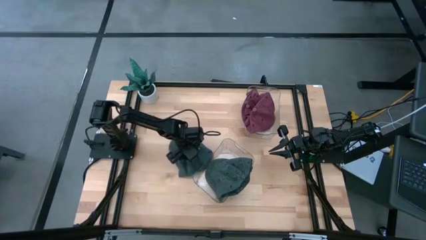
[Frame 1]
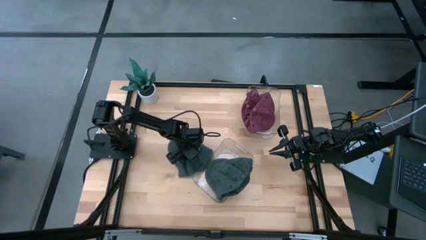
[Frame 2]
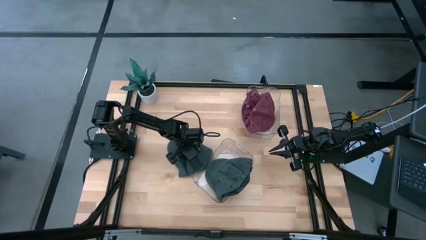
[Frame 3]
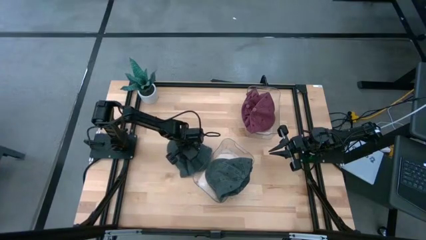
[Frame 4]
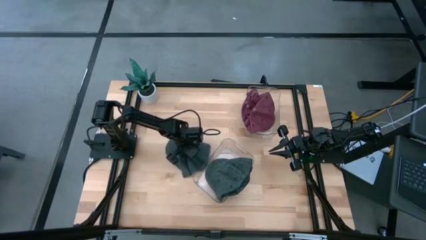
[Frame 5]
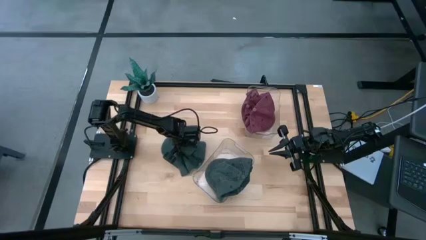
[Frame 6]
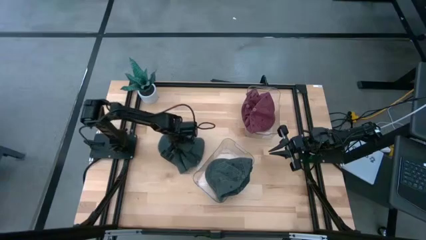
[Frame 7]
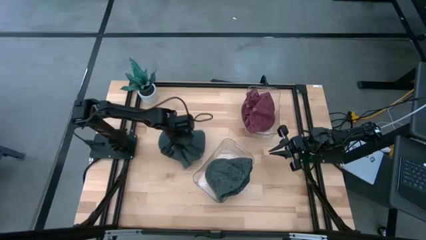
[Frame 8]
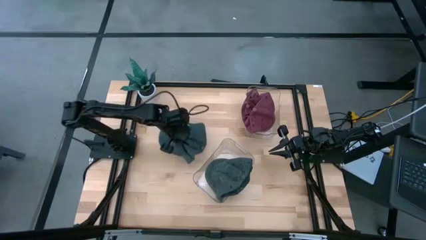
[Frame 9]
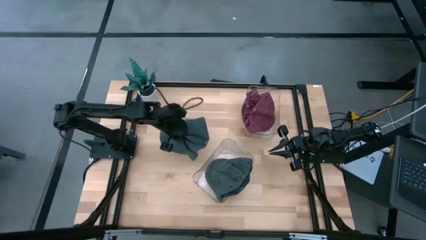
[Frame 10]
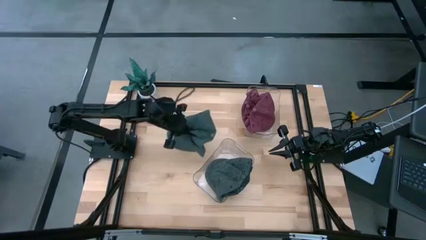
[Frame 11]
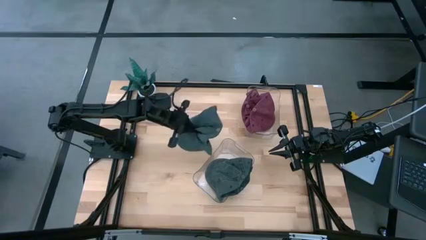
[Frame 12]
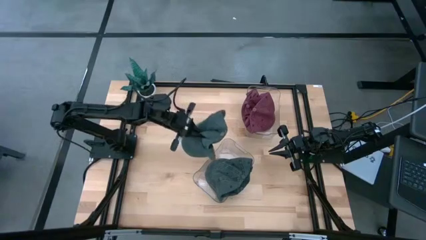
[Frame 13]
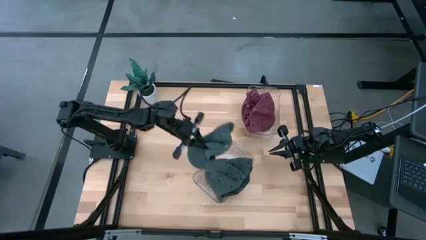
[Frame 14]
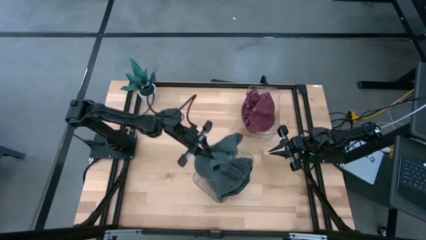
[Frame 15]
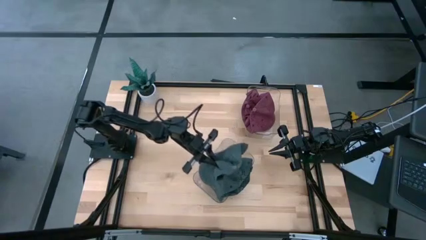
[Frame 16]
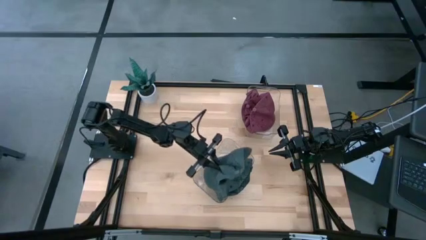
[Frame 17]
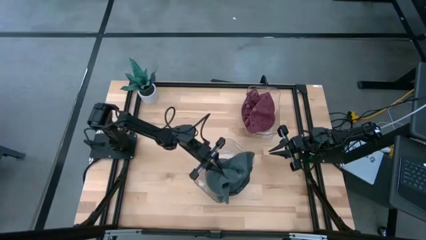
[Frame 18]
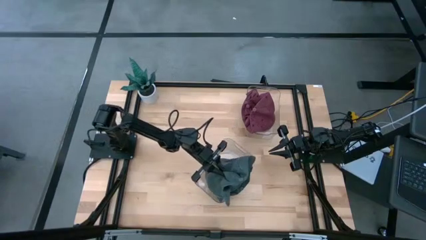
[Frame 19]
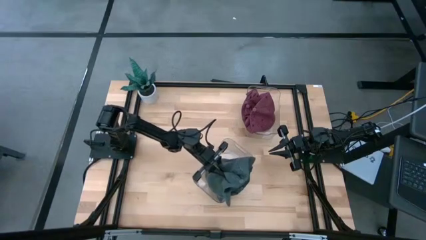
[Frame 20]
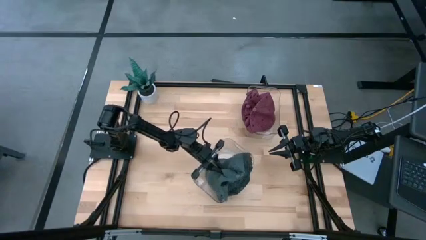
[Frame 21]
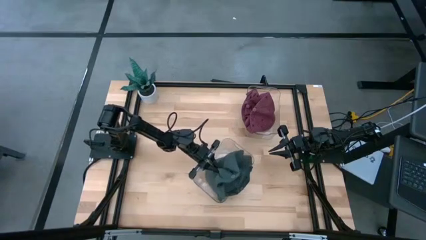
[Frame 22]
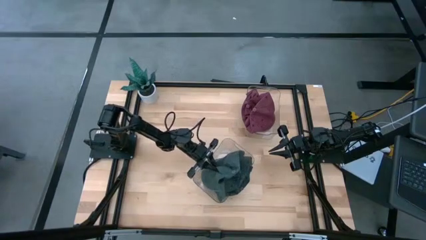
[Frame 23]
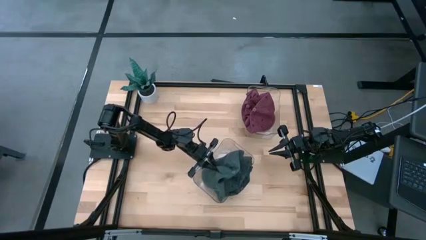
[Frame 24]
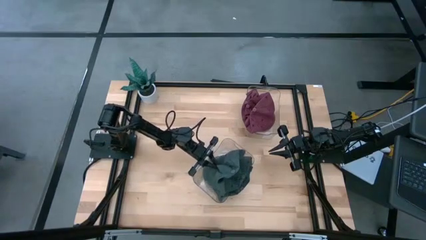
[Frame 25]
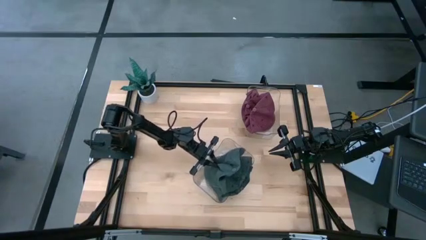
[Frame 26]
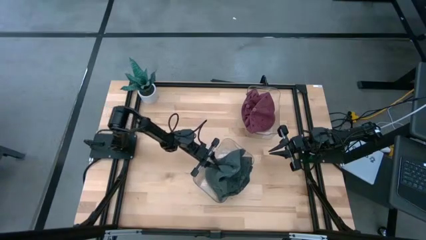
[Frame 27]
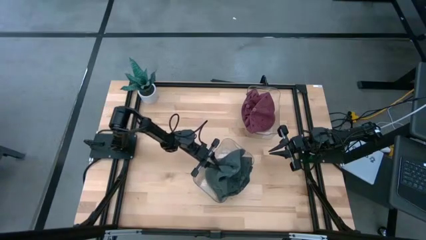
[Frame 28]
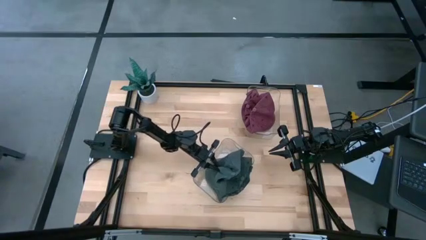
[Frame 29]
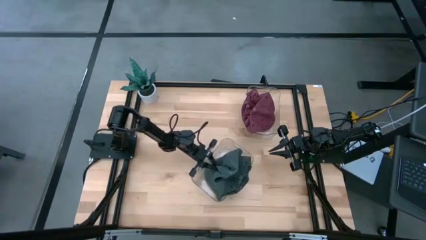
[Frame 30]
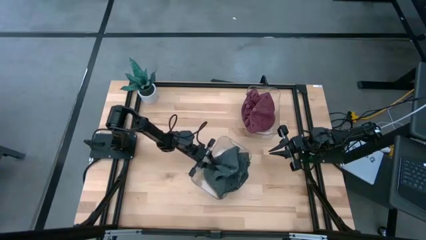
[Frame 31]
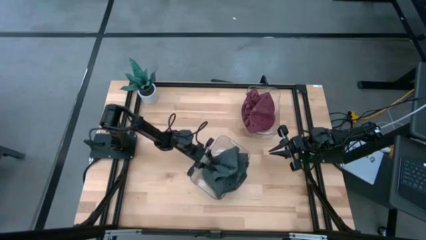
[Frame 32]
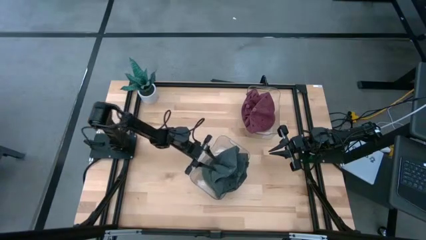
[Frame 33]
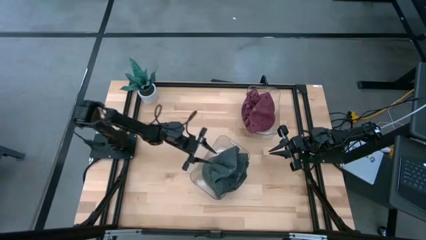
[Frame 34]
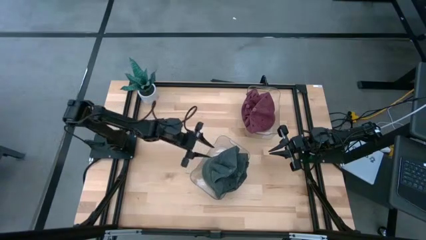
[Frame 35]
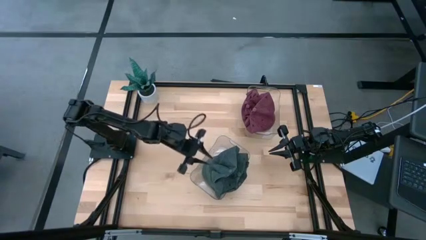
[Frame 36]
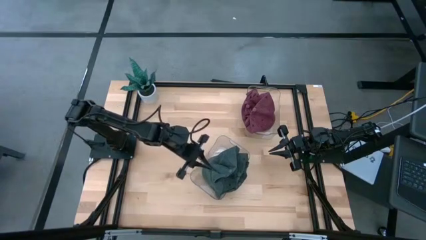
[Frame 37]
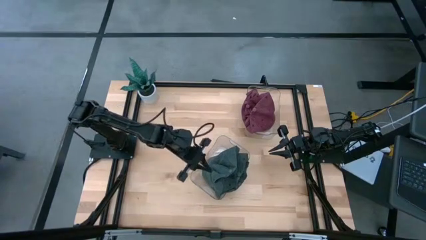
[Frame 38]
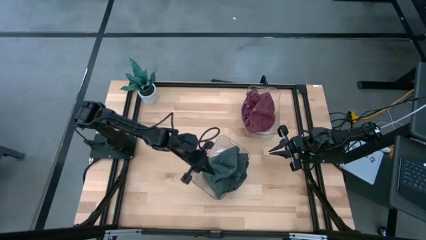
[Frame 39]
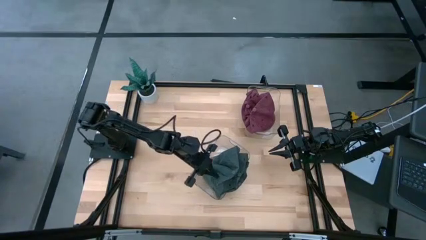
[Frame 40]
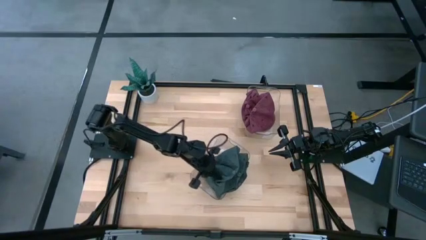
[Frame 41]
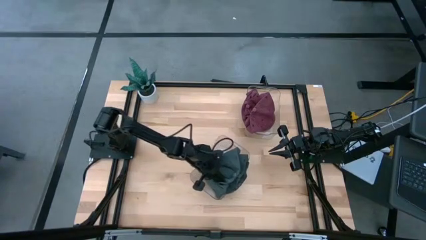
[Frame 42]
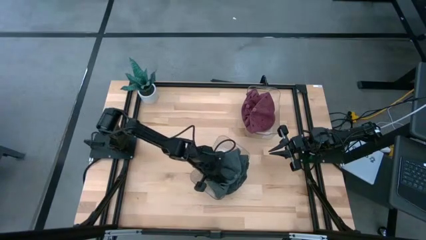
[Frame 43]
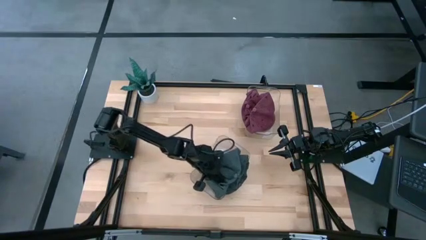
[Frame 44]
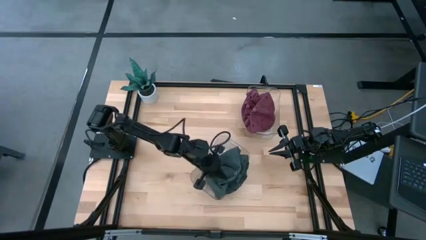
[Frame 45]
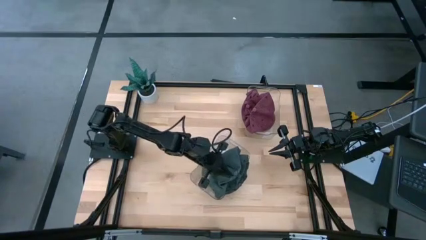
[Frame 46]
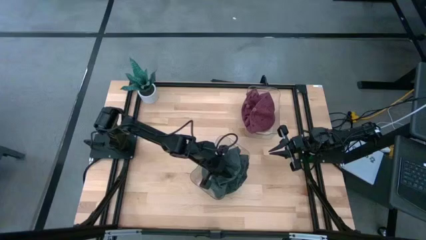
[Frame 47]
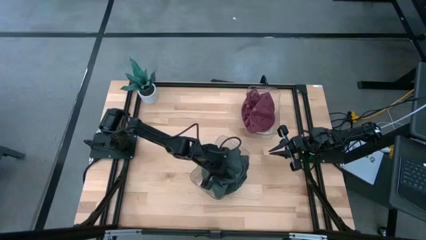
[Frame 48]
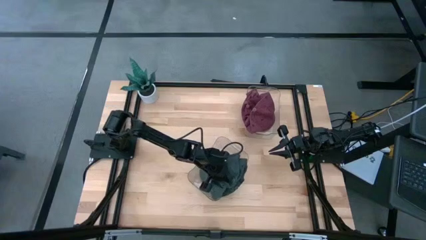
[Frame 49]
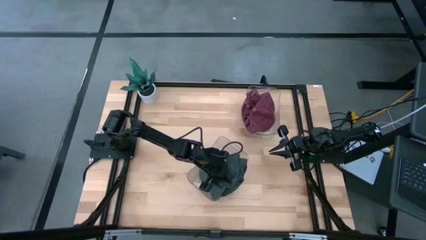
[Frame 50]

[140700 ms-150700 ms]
Task: Pick & Place hat
Put the black cap into the bottom transparent bin

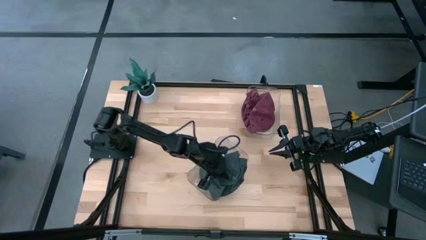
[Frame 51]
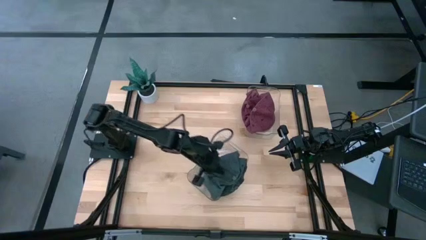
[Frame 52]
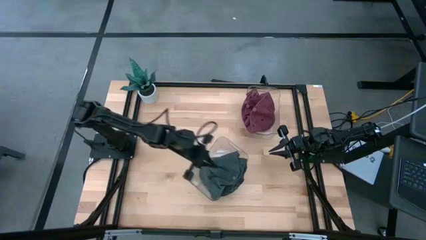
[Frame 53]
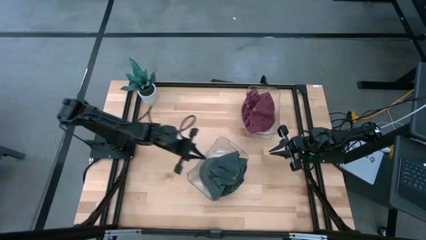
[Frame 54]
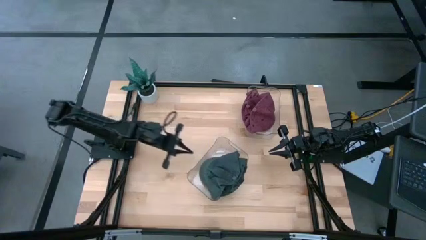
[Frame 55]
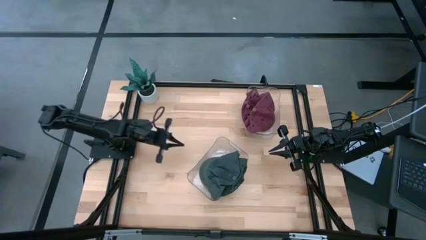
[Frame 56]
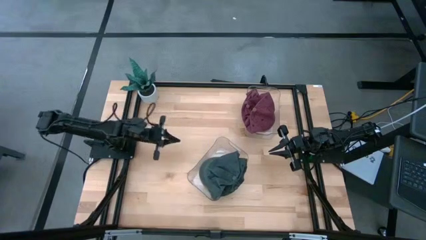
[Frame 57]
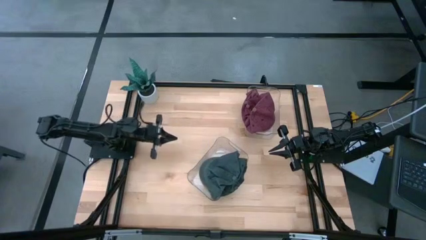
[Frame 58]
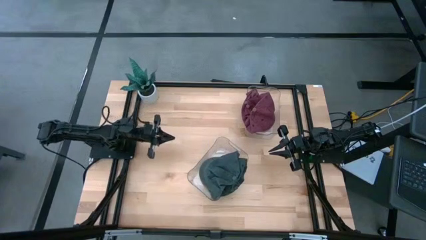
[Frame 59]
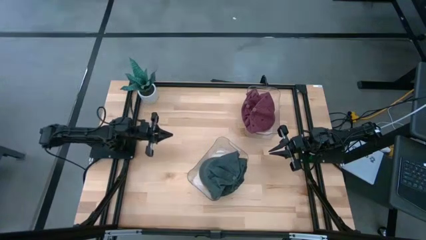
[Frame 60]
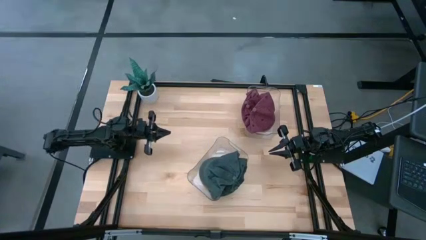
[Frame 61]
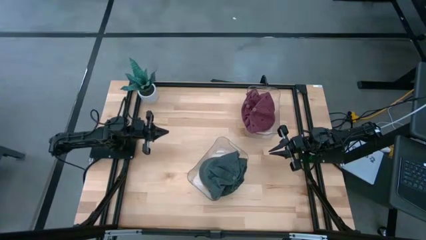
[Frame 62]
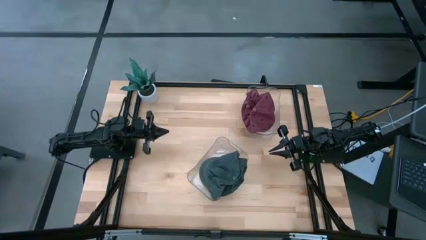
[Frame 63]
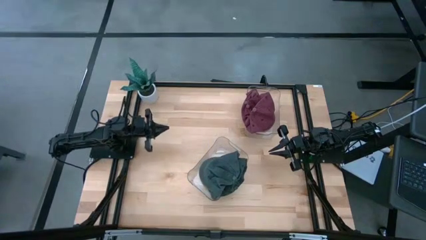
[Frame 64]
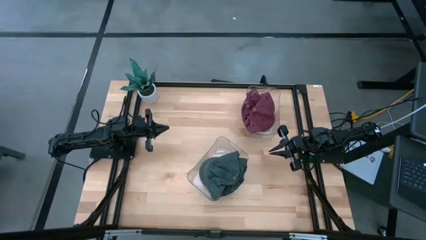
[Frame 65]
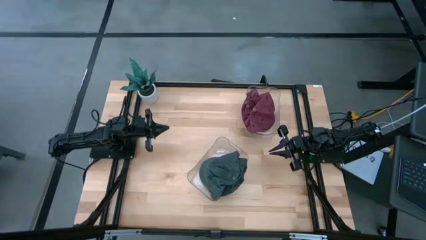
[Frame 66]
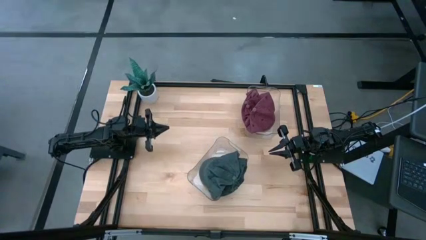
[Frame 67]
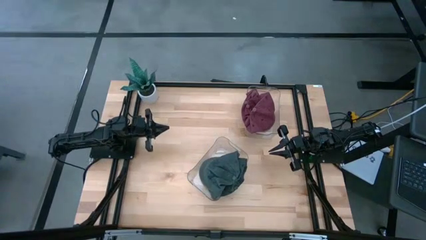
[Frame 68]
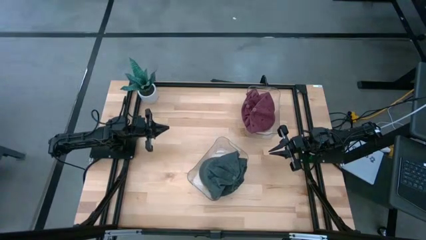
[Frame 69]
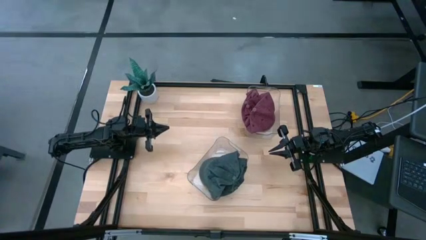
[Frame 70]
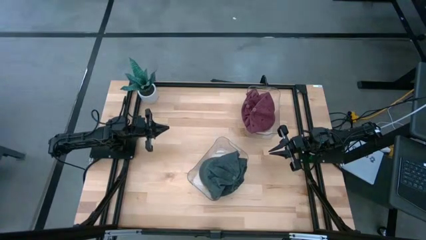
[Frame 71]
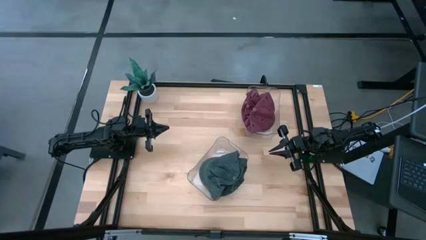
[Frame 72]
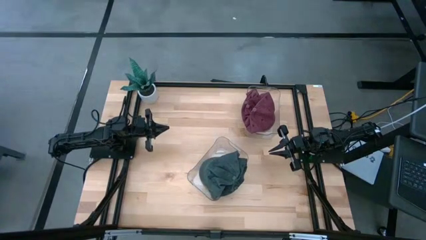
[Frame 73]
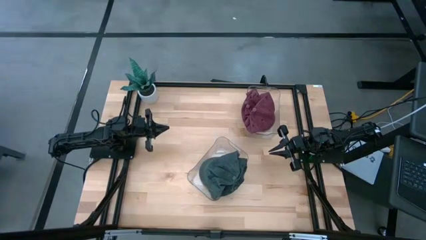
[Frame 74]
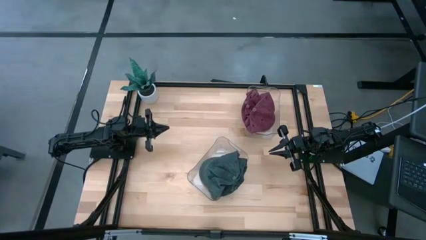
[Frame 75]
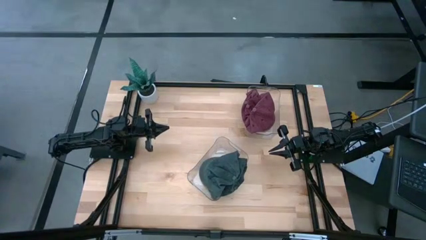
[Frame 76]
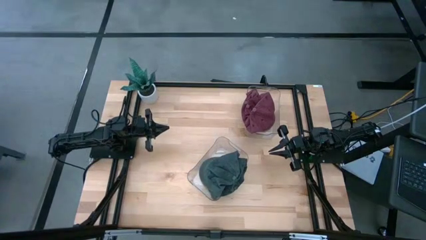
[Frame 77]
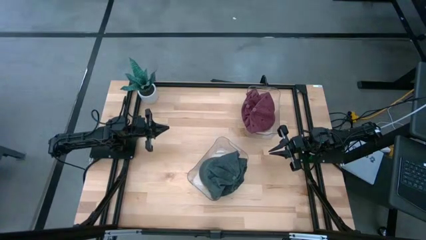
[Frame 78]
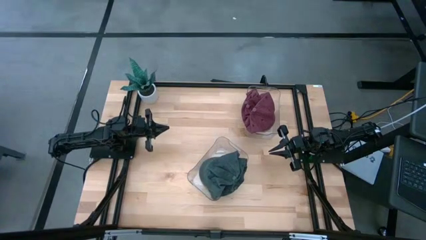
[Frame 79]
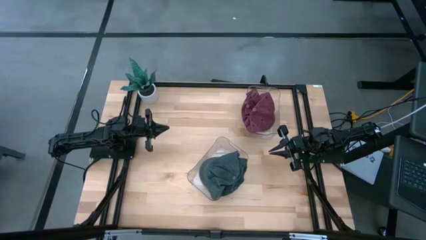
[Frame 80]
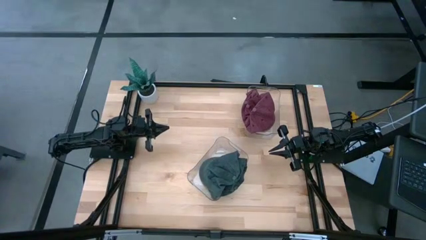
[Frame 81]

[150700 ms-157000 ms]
Return to Home Position

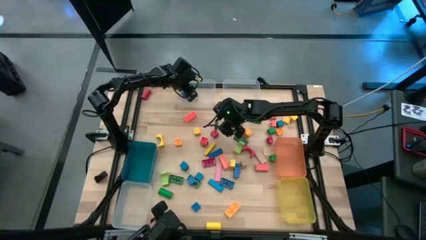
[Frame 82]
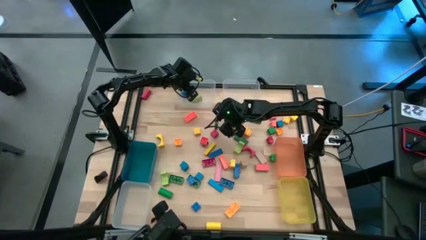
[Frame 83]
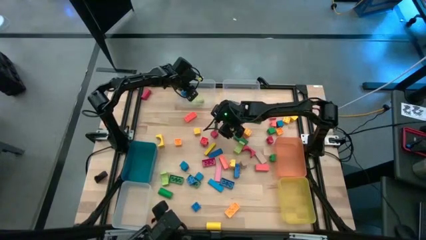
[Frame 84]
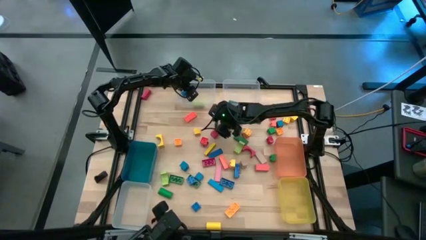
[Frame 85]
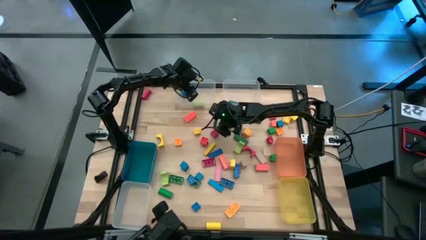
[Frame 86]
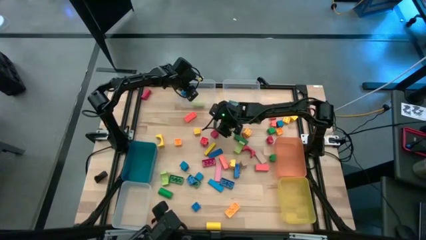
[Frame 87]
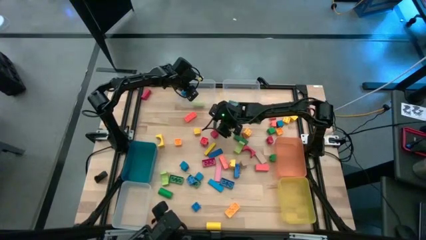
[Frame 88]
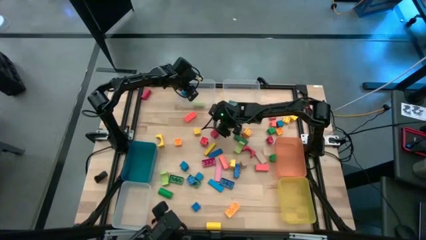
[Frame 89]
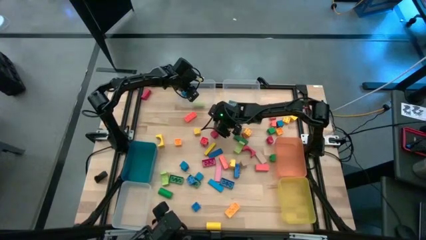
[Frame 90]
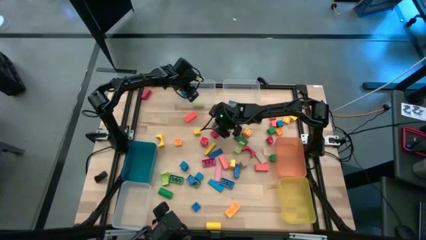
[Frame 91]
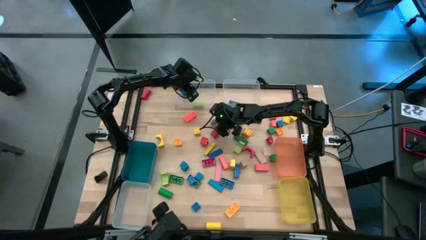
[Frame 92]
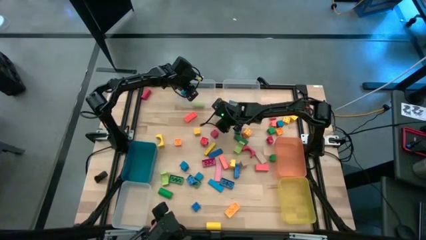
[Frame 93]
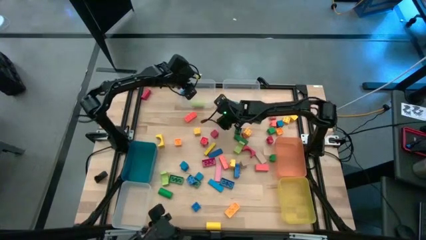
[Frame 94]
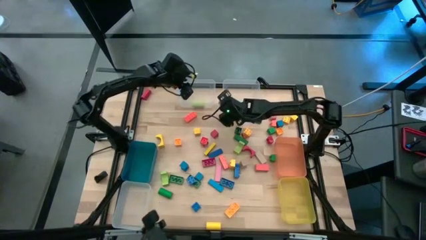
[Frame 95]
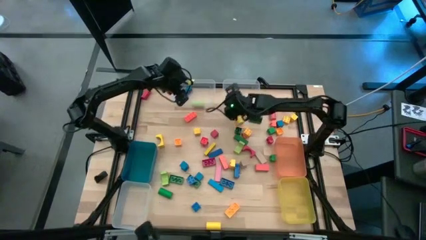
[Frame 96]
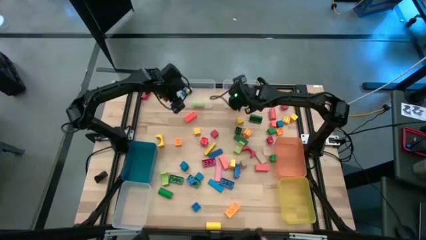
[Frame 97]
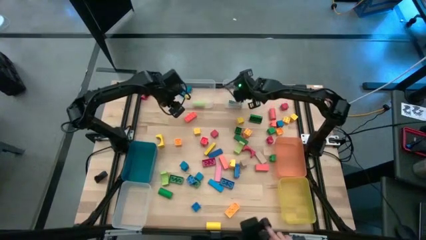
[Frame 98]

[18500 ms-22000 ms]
Task: Sort blocks by size
Put the green block into the top right transparent bin
